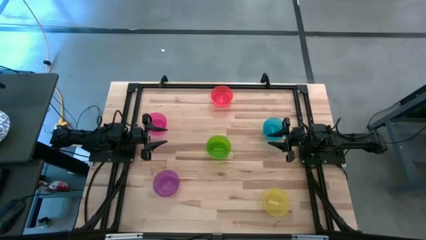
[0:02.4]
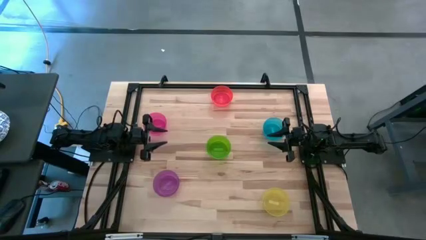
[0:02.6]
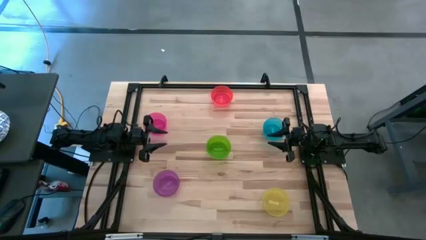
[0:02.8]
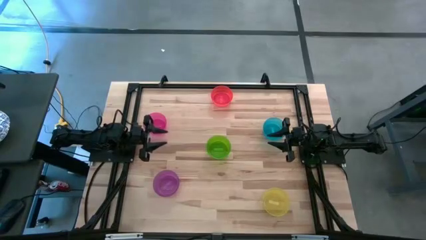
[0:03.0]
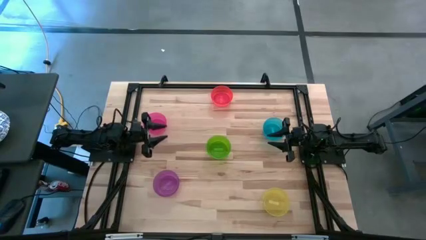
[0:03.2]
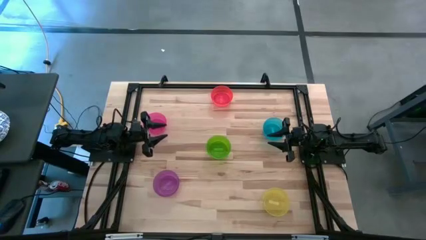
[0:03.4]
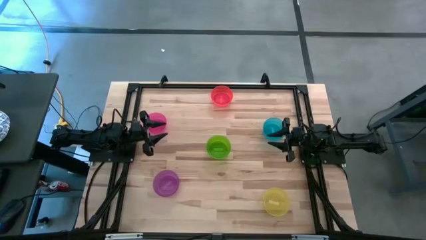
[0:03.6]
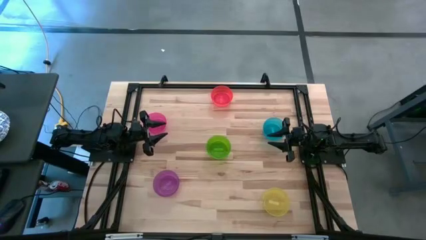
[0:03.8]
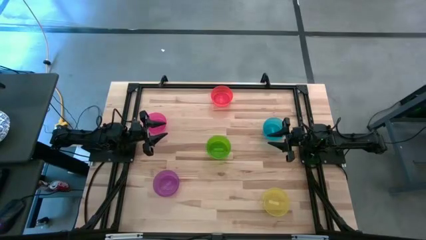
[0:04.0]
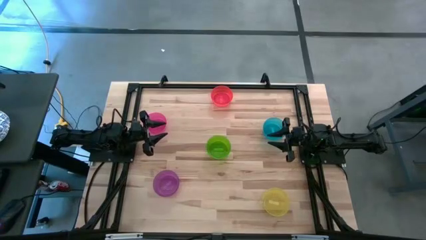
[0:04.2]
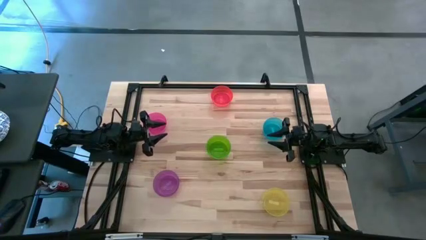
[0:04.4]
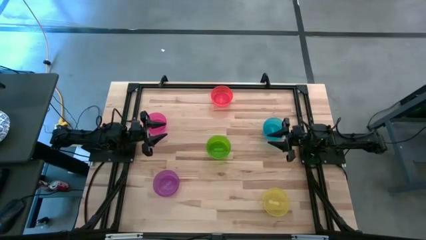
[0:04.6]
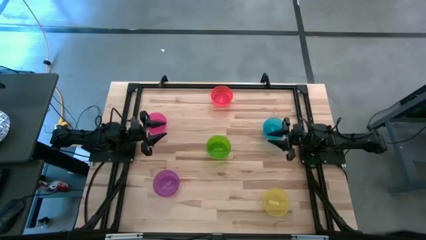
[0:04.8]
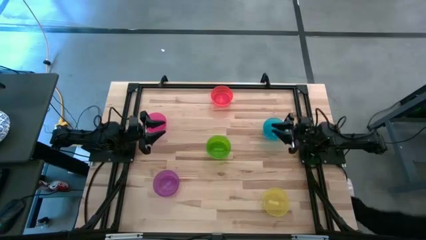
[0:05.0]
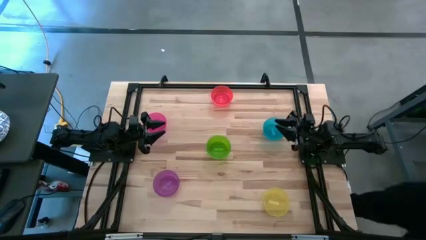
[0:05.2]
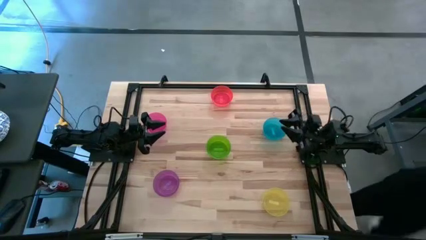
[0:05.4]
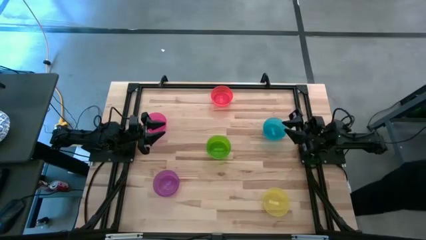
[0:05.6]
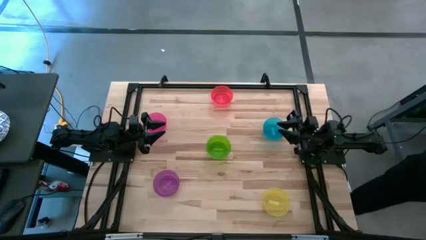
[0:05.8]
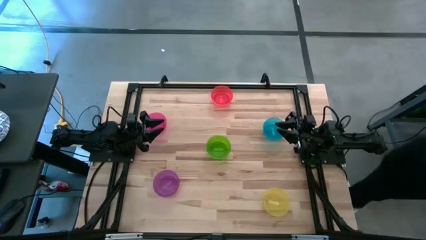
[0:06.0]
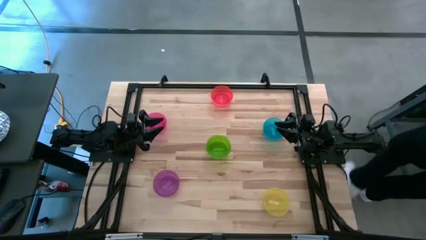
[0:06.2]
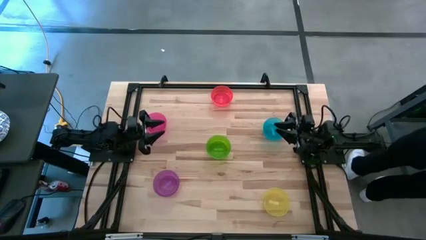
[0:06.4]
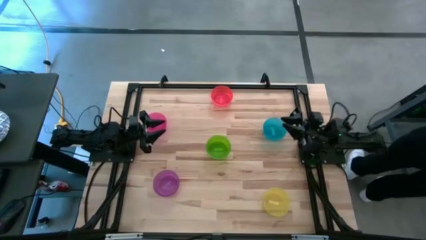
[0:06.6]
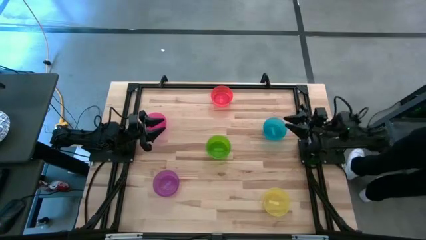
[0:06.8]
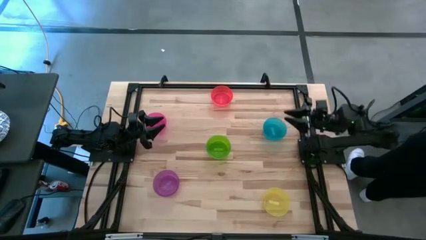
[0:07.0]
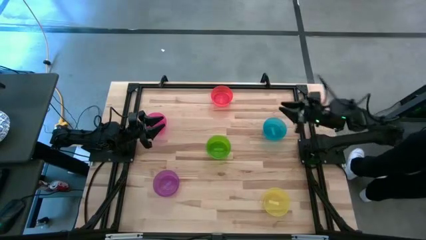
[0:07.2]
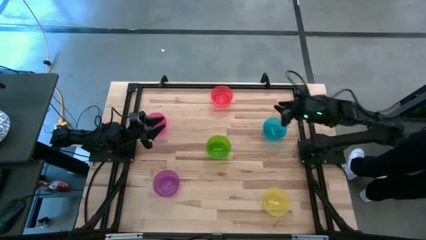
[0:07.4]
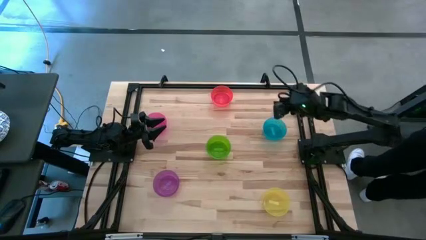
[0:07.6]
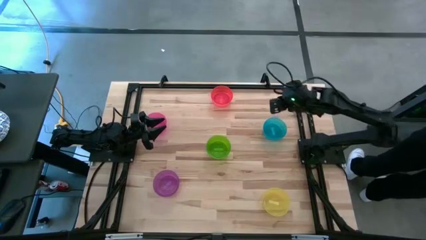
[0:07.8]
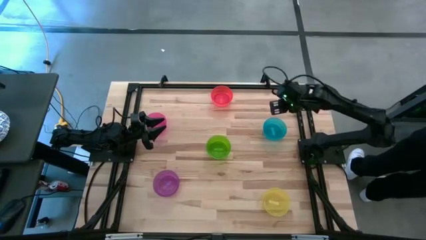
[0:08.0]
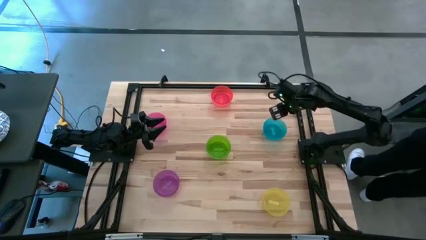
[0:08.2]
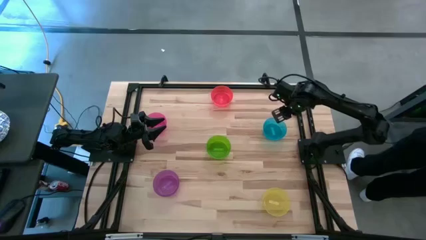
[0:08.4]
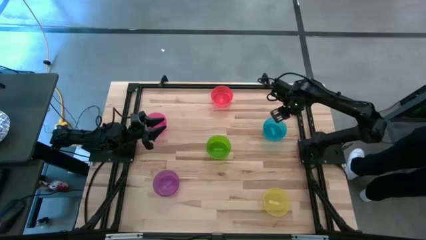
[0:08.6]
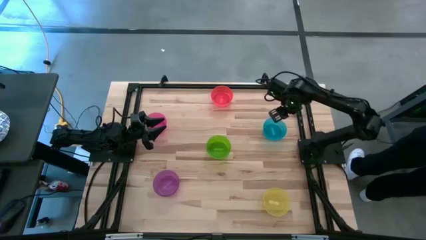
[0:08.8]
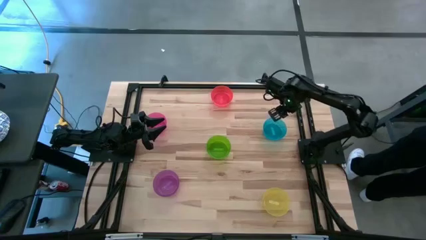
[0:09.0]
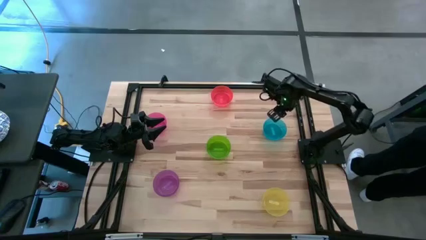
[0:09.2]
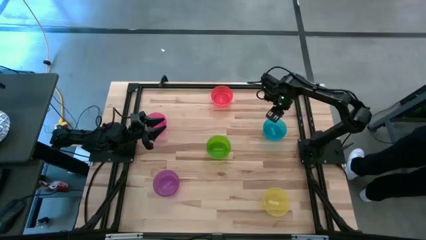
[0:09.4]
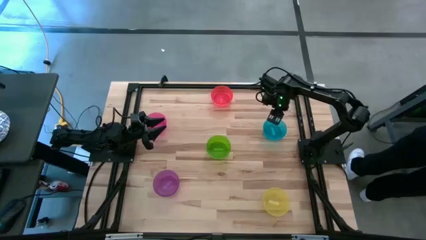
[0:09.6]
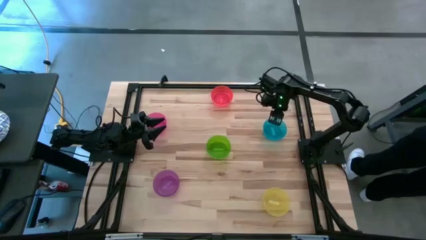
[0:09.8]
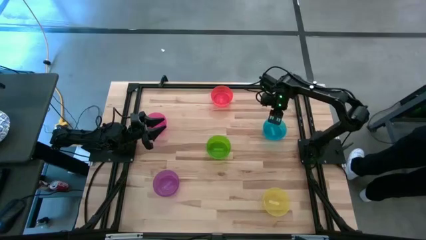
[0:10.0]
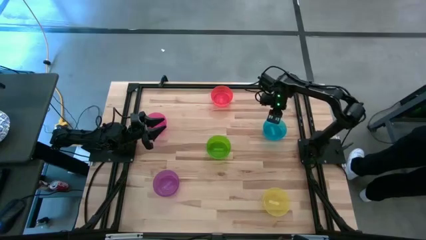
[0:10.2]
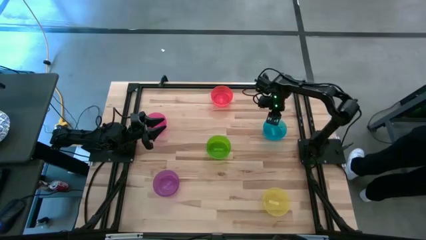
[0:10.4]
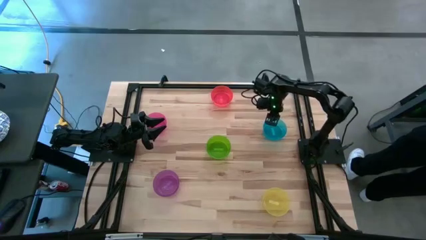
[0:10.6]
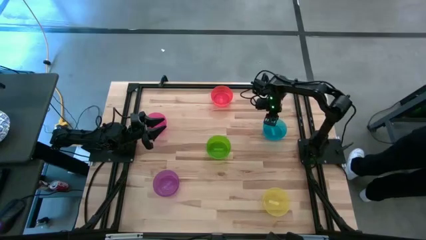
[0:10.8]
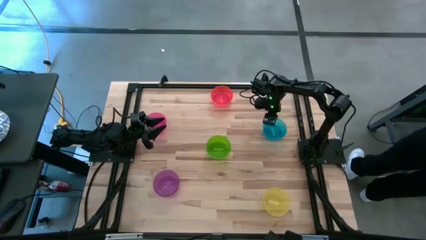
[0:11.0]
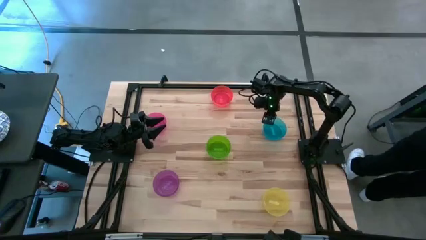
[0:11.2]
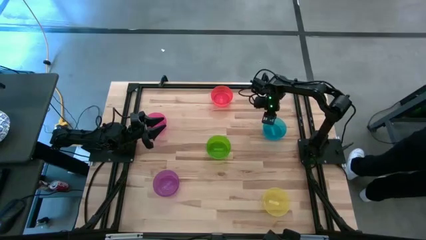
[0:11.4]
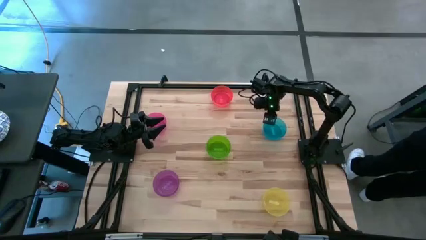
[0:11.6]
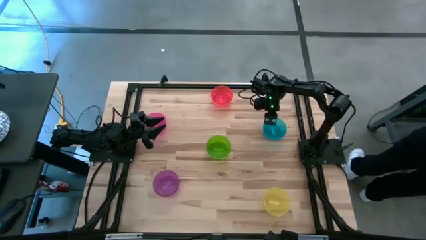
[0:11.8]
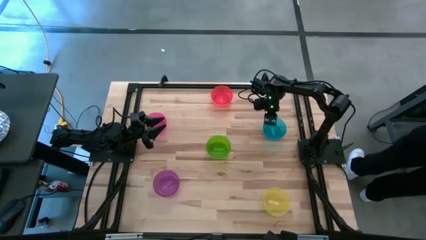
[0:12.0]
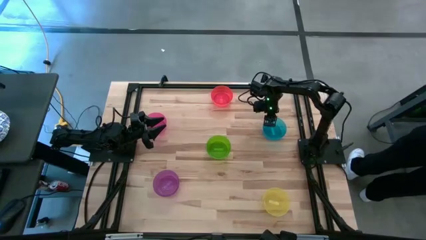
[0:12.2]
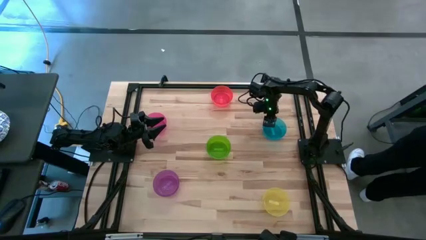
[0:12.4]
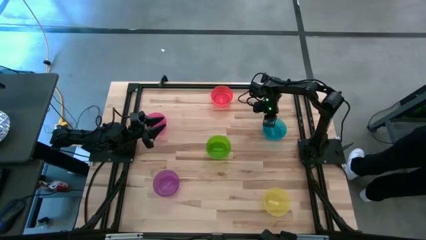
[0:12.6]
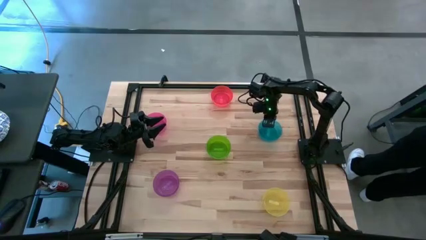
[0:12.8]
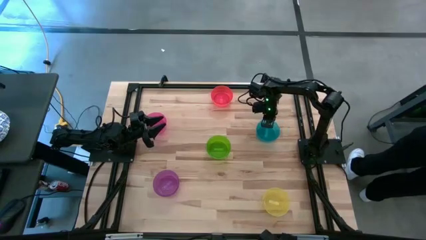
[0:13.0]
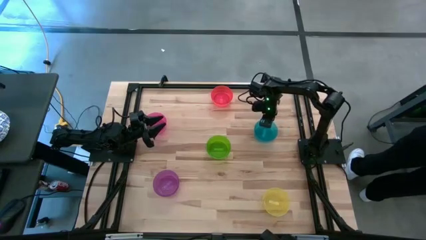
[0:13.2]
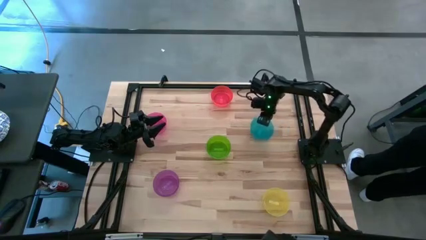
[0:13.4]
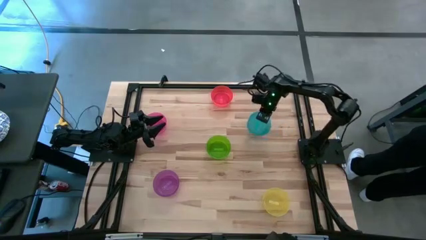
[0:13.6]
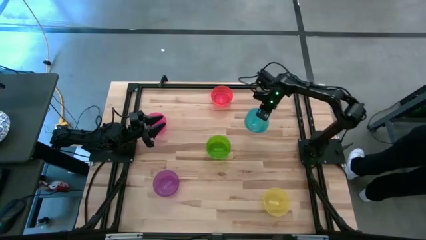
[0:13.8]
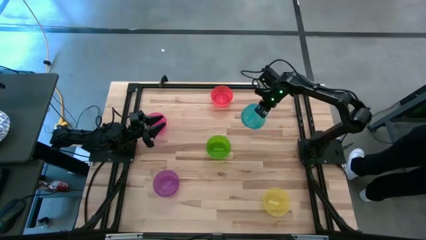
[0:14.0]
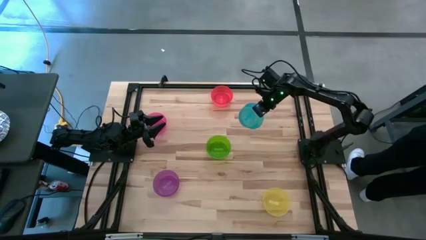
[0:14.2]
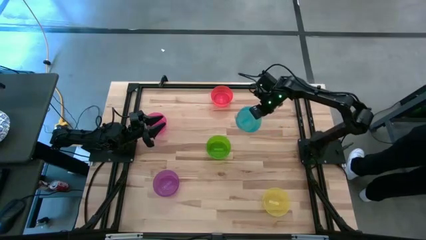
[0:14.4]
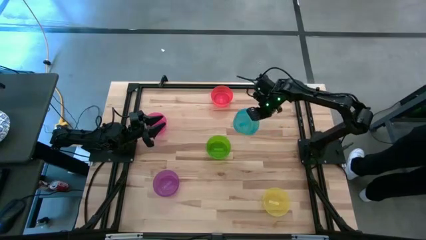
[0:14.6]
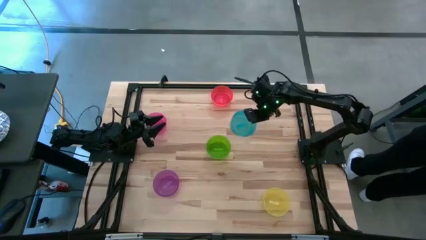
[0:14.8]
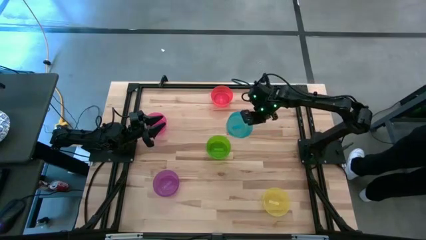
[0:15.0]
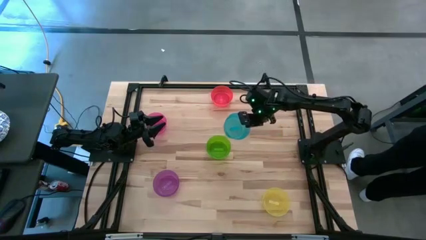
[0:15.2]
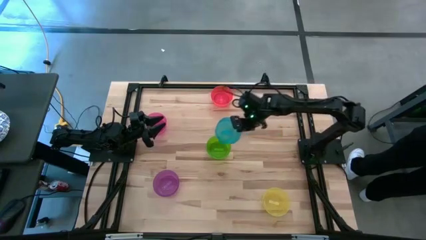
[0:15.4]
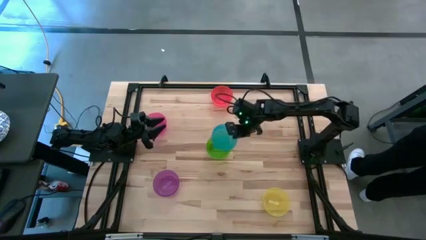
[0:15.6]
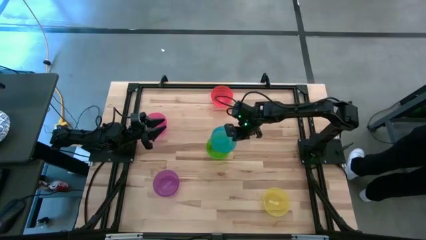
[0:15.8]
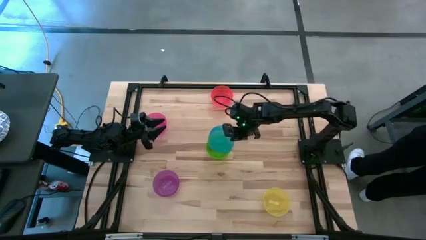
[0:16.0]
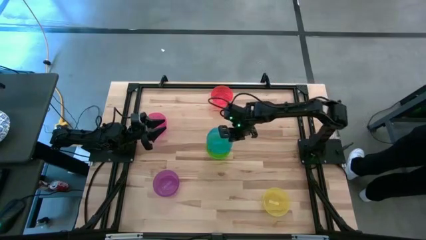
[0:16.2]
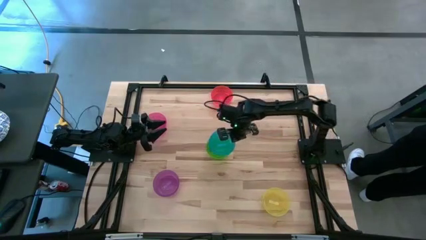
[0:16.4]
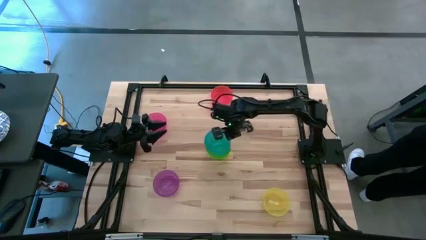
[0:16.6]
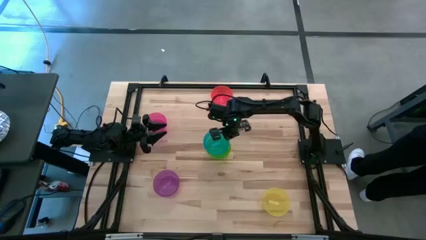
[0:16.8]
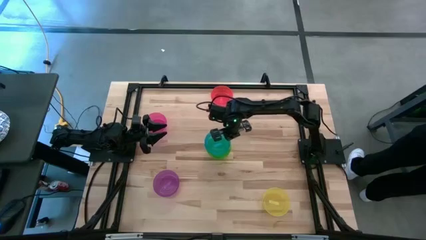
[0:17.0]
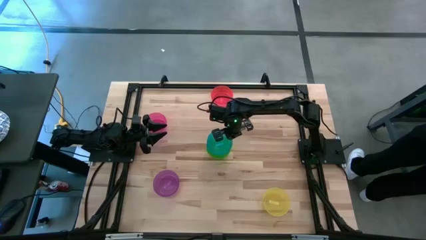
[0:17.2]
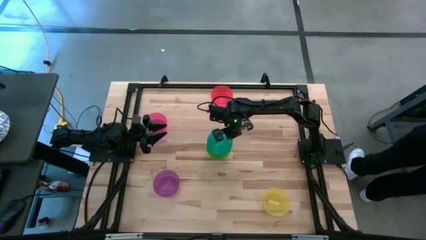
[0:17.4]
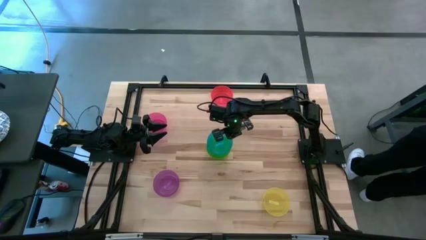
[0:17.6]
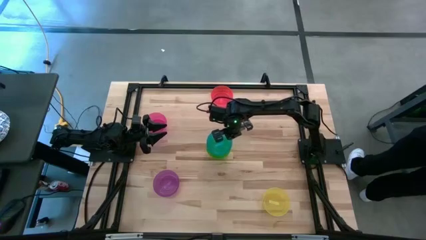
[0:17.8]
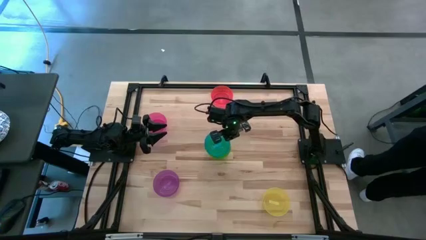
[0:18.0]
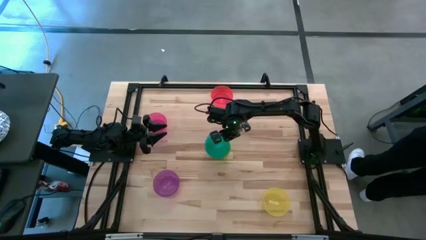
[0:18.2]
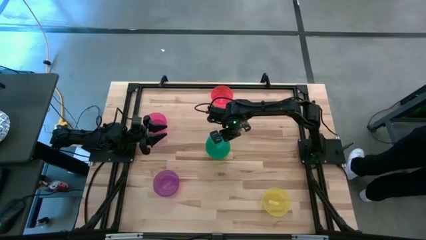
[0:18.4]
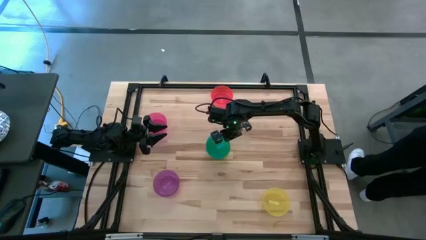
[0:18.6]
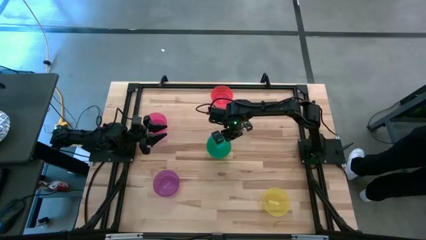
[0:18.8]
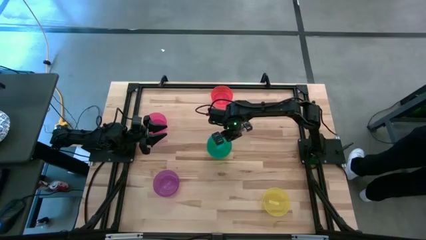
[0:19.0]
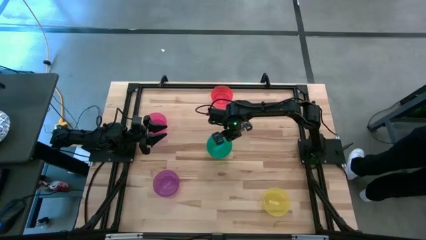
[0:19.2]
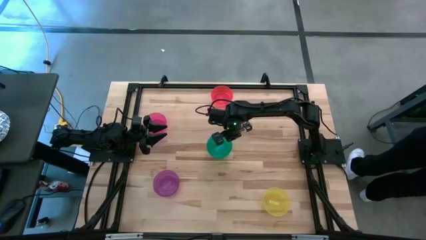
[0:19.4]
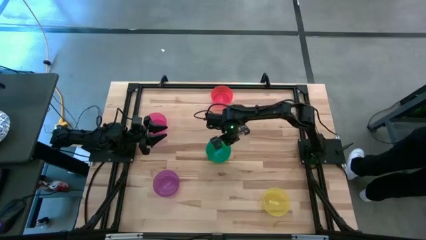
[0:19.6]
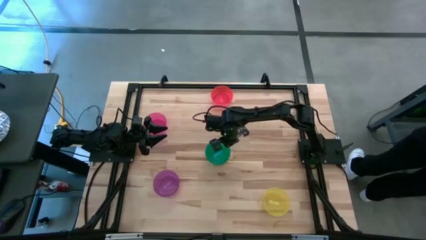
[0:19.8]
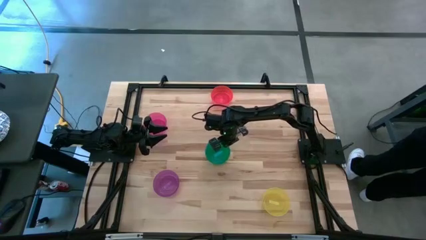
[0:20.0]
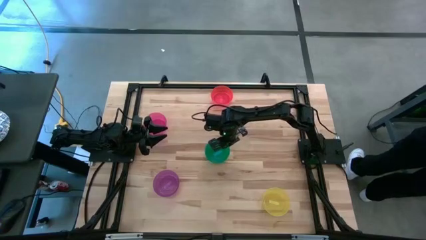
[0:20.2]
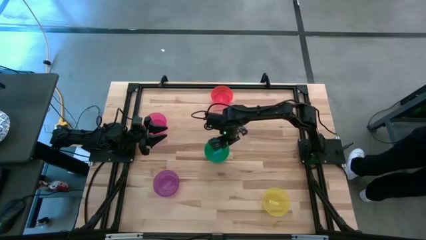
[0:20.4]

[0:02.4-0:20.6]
Task: Nest bowls inside each other
Stack the blue bowl on the green bowl
